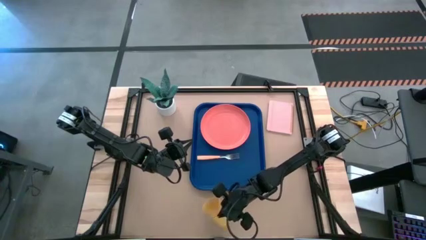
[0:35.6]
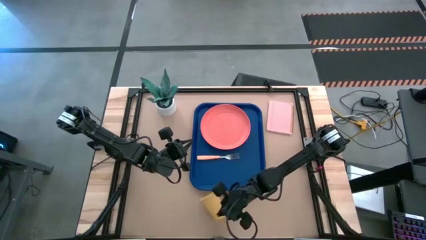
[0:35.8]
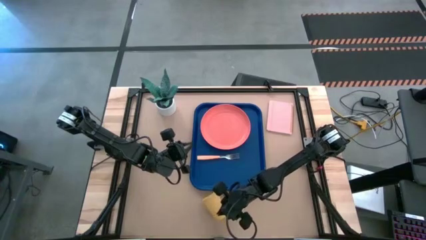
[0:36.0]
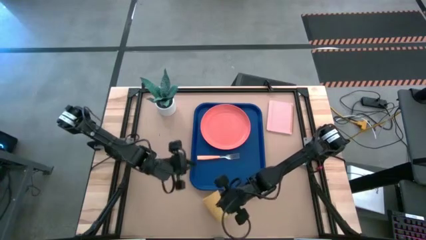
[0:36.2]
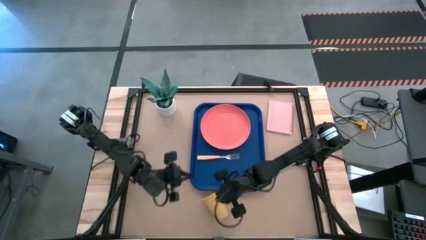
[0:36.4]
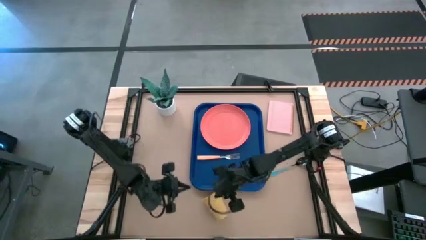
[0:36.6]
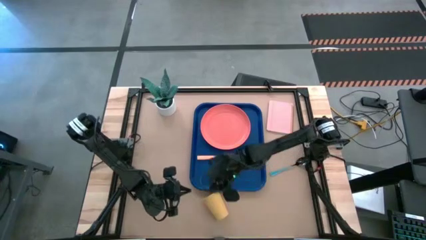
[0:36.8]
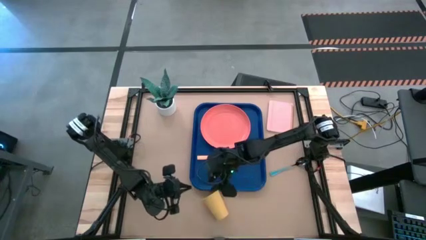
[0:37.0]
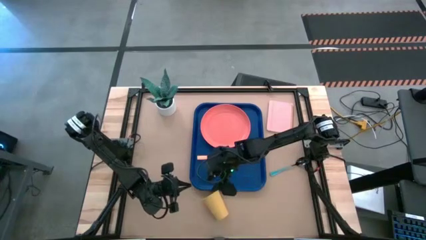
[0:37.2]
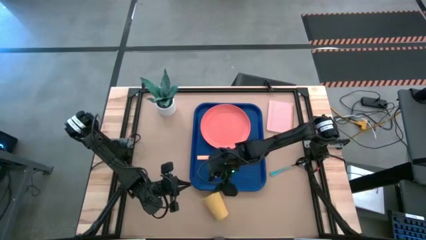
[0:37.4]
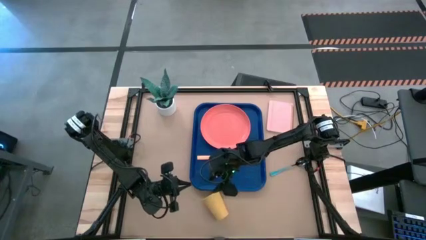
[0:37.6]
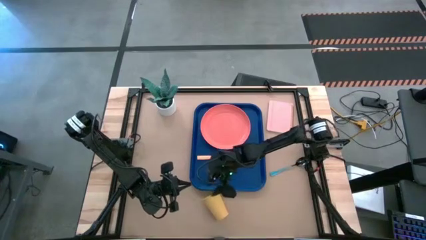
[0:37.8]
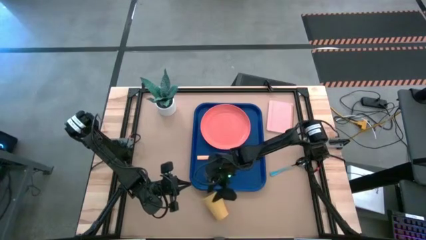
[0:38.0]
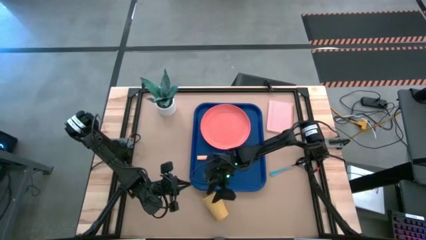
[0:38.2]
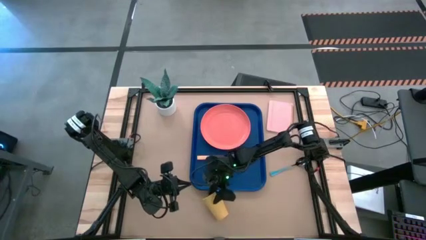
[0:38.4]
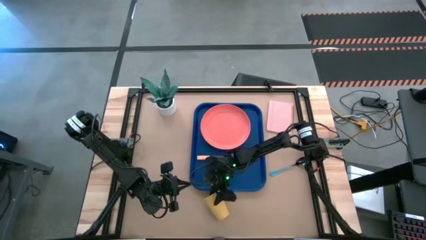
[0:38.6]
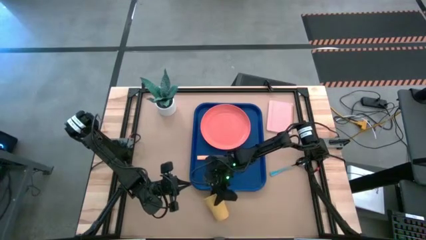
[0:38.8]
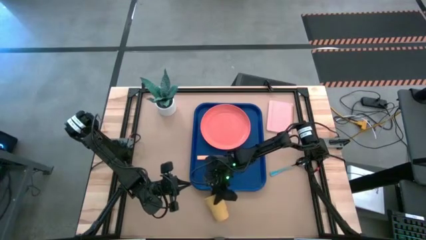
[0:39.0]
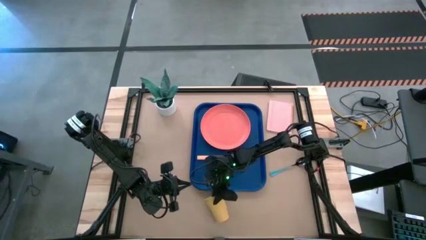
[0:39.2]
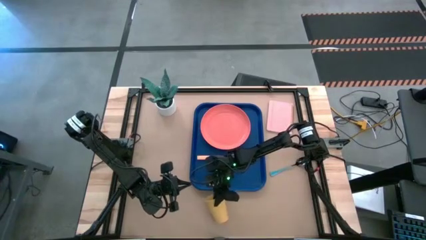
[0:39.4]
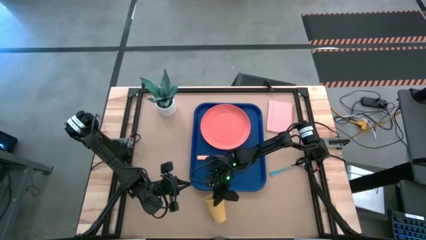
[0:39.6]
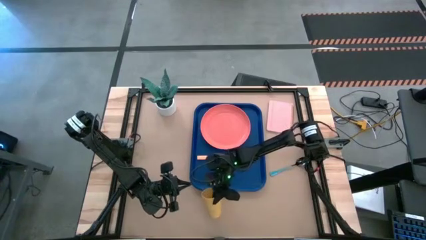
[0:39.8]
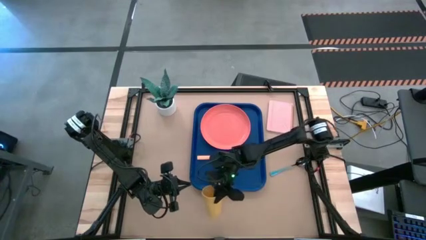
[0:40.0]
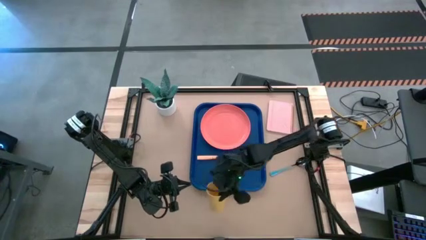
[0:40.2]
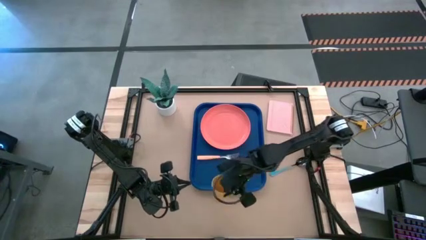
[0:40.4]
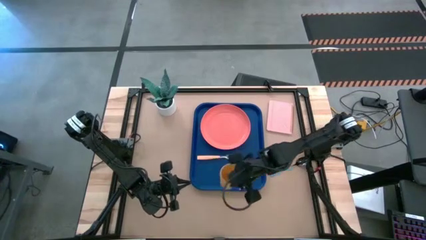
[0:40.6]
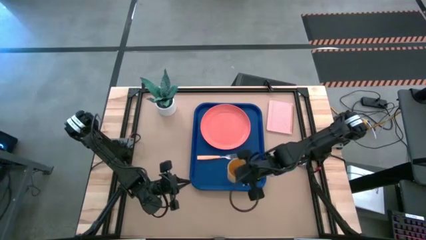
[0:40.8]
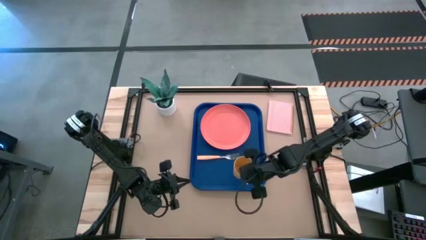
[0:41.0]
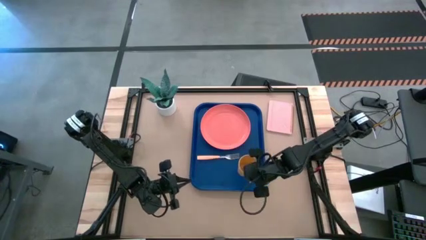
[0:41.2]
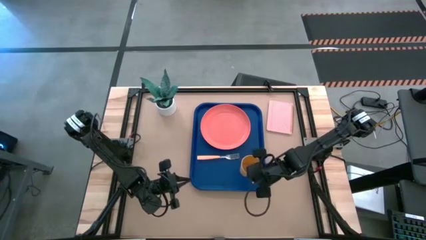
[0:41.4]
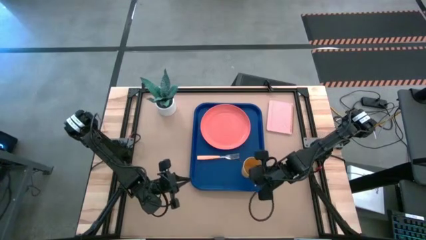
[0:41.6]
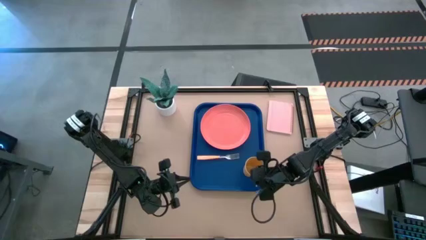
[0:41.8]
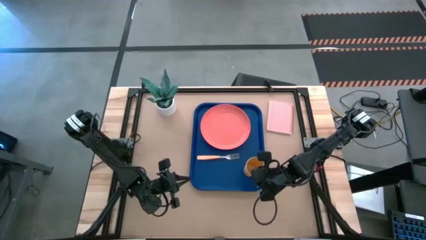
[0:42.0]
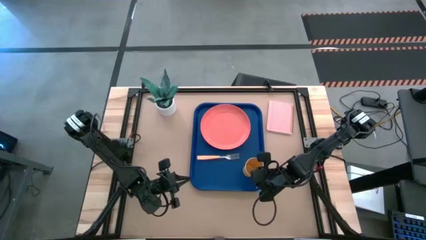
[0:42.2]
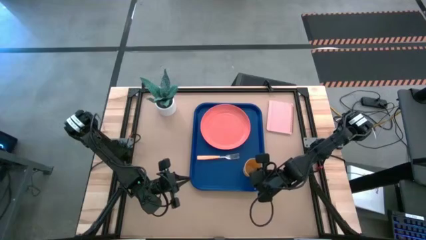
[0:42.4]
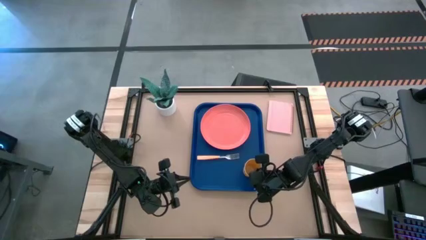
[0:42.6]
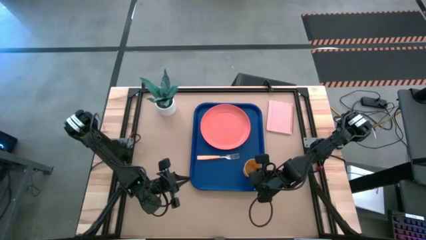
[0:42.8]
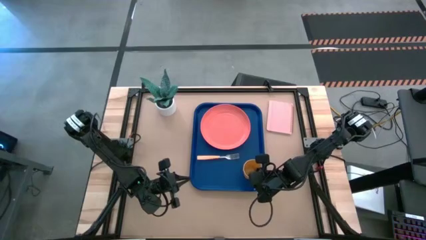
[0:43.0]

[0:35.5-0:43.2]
Task: Pick and place plate/cup/fork/spoon on tray
Put the yellow cup on the blue tray on the top right of the orange fork

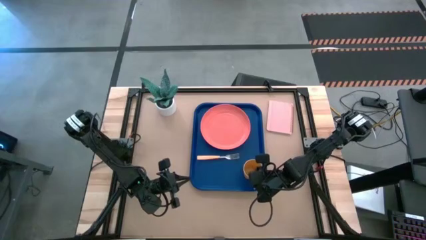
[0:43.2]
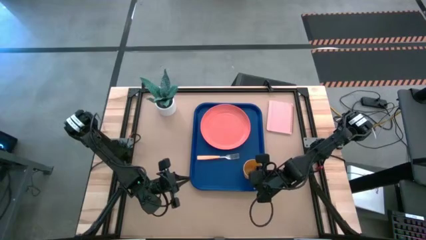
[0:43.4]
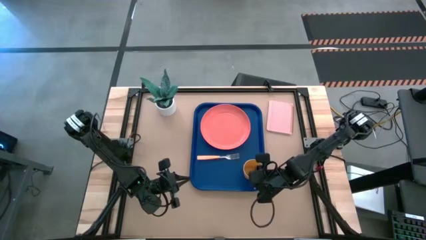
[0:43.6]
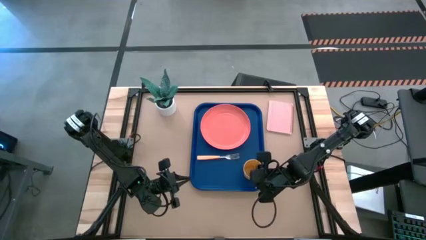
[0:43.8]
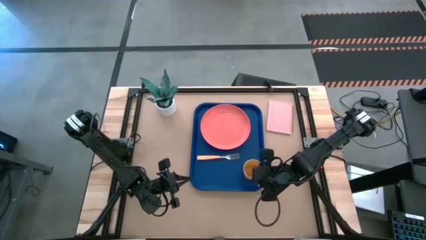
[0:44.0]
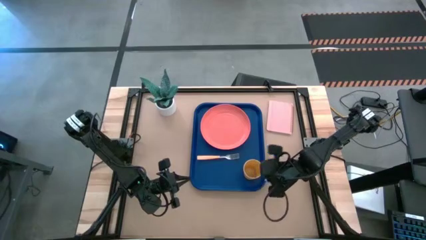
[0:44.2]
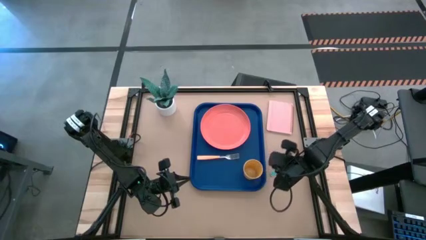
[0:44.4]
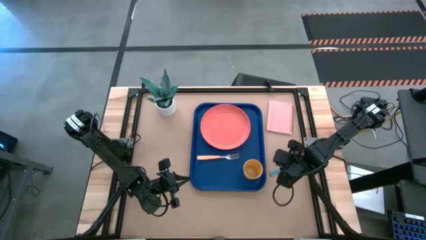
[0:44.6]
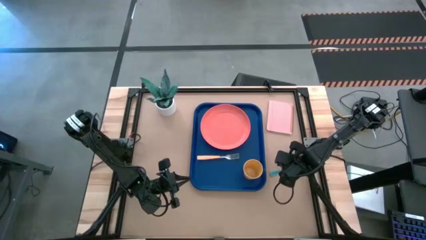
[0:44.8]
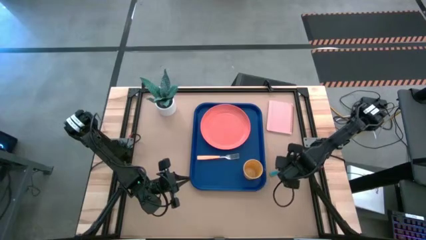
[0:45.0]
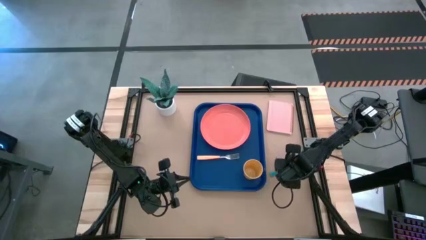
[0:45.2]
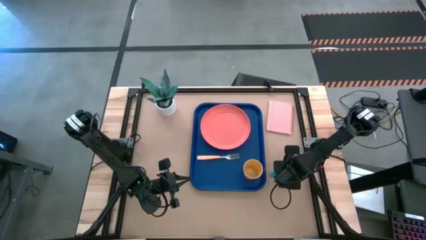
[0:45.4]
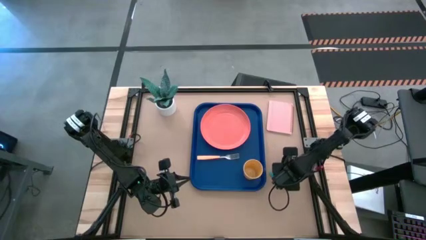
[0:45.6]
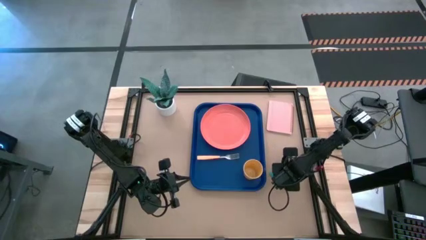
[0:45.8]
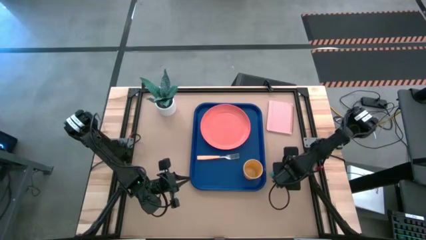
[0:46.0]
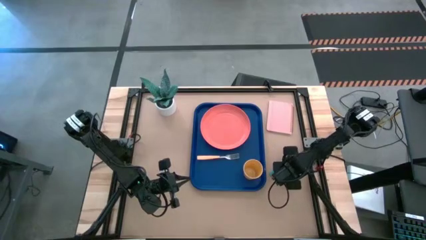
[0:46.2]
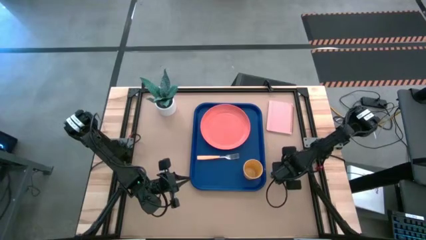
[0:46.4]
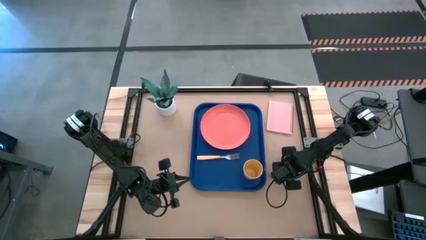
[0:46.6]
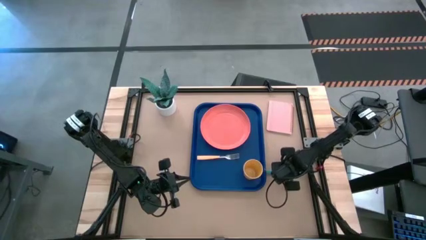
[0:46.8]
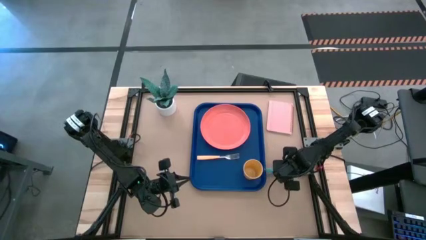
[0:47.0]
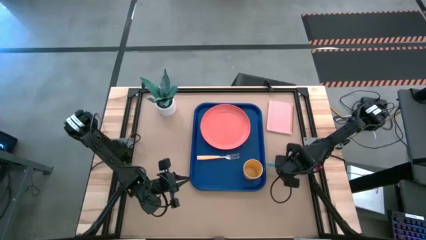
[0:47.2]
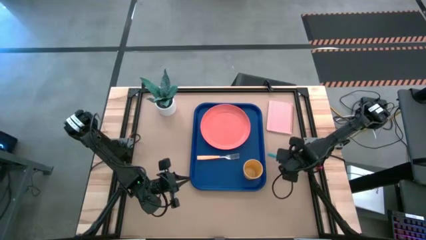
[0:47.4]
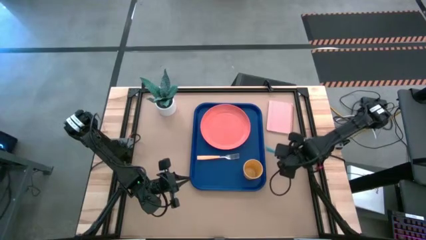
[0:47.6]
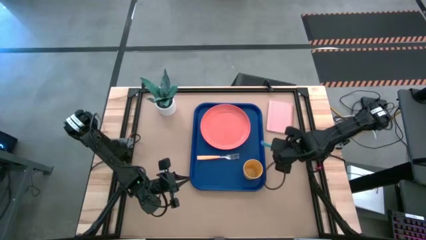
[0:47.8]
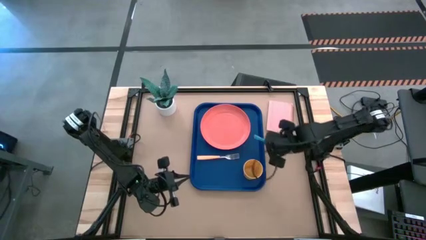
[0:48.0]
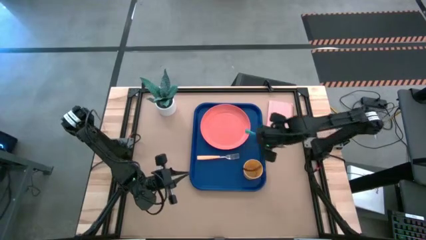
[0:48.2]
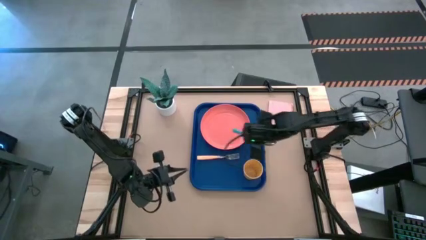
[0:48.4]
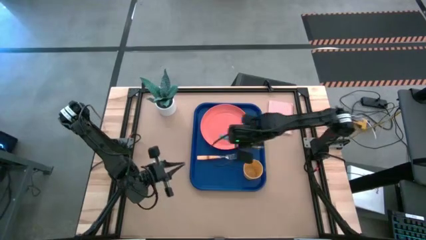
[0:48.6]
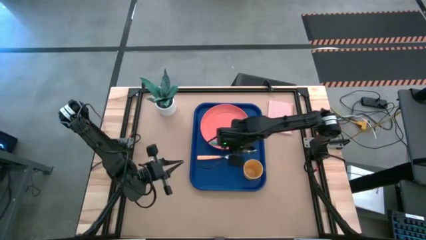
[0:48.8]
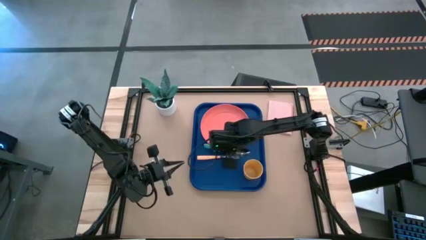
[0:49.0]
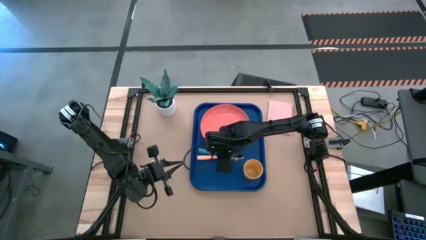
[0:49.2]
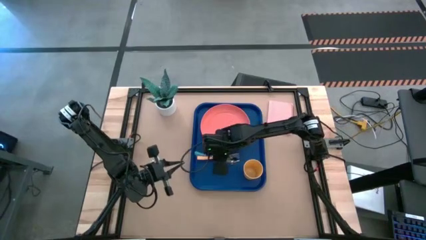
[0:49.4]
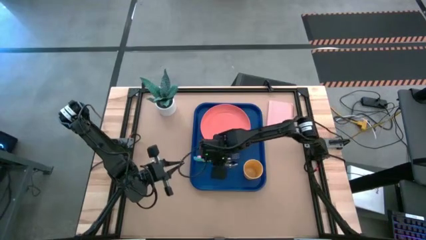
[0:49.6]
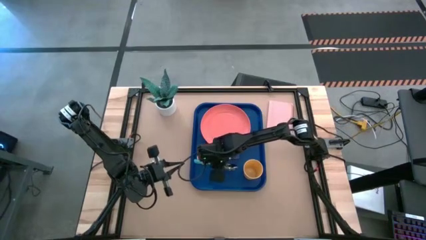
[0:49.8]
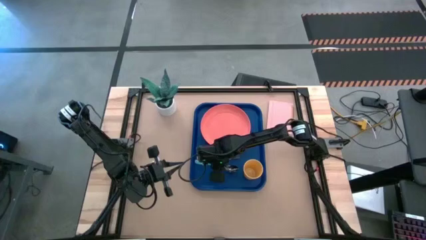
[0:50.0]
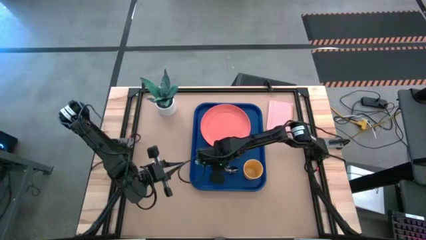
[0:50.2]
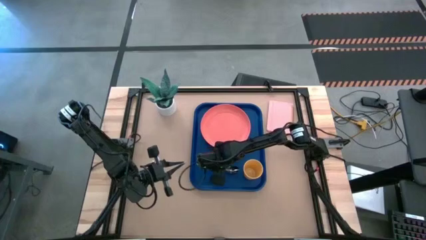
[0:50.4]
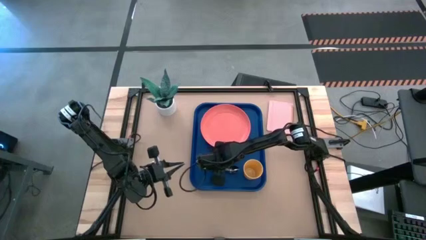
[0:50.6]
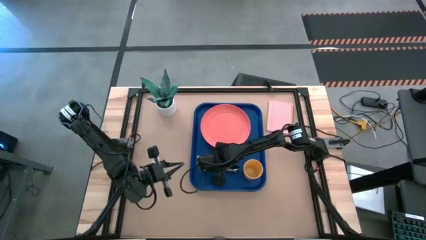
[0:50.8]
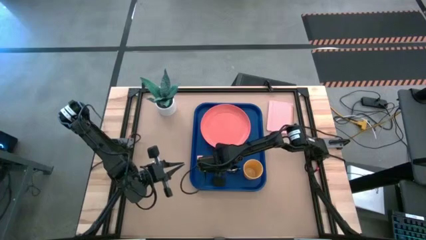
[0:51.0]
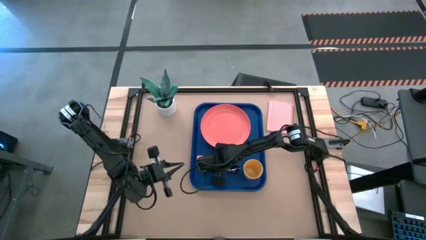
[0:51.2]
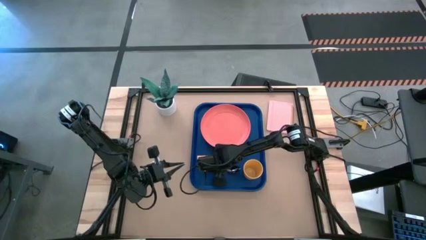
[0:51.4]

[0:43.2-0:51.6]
Put the green spoon on the blue tray on the bottom of the yellow cup

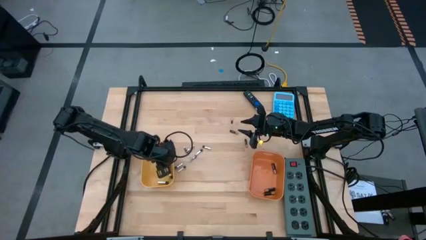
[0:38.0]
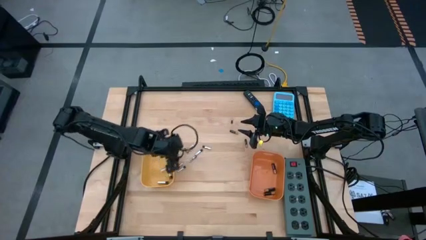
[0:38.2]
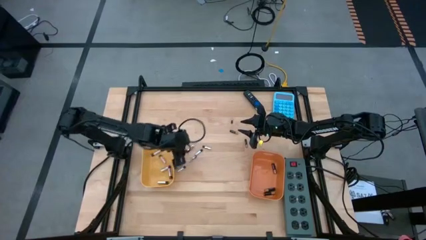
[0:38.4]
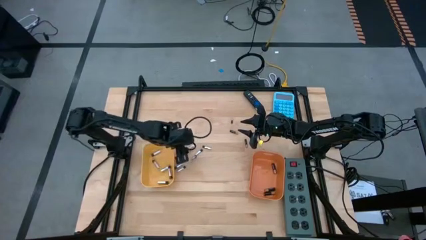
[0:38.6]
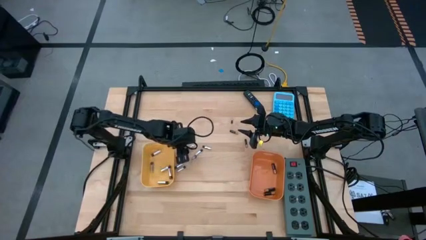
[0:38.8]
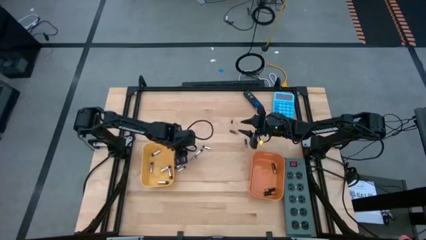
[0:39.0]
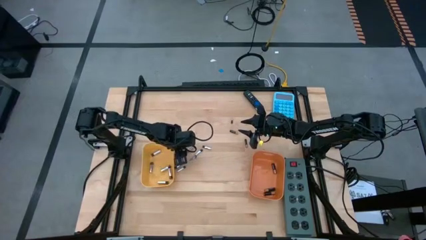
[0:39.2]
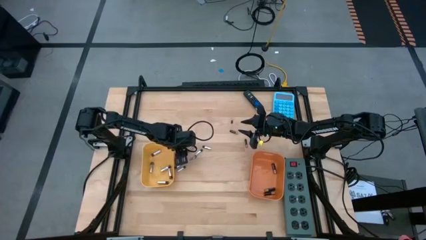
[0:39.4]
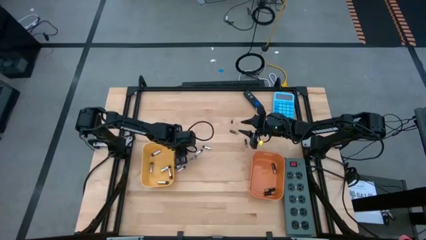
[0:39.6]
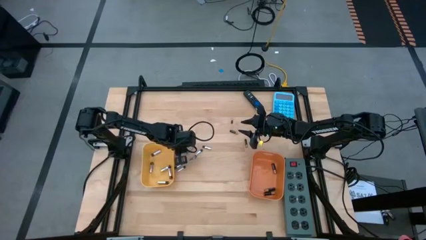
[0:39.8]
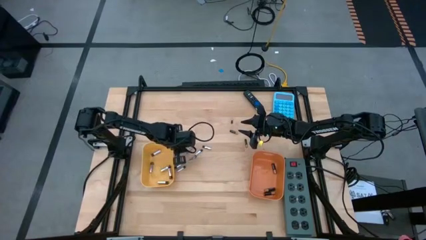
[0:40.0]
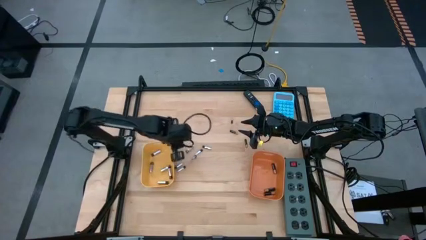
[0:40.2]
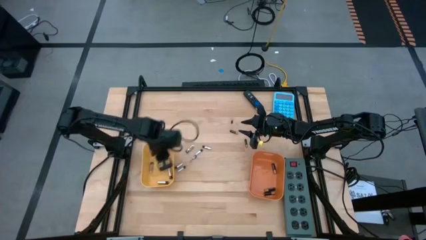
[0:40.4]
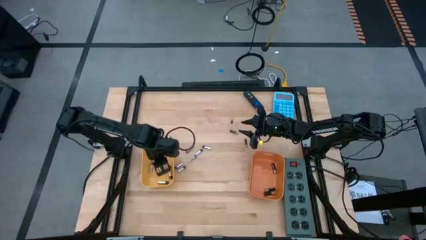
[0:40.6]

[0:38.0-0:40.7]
Task: Sort batteries
Put the silver battery into the yellow bin
